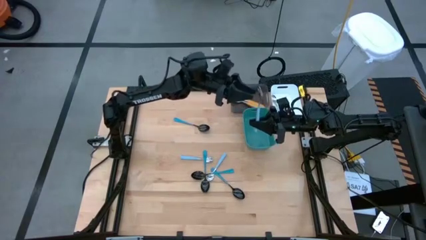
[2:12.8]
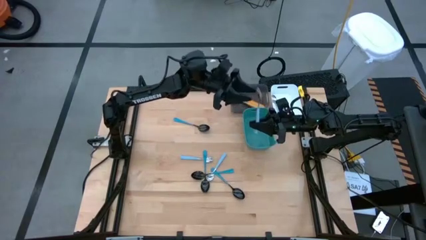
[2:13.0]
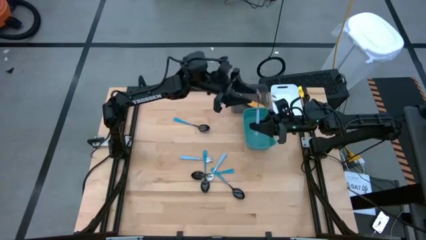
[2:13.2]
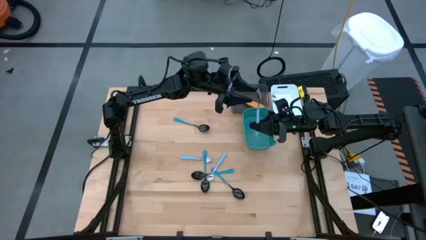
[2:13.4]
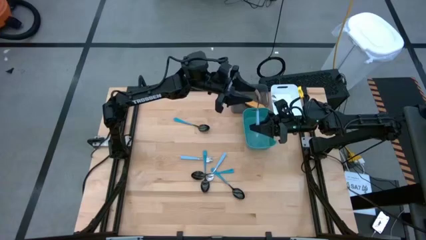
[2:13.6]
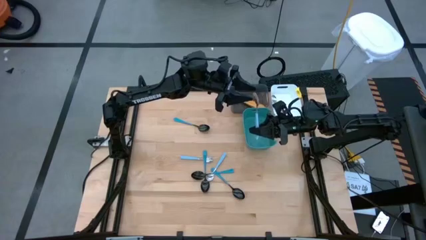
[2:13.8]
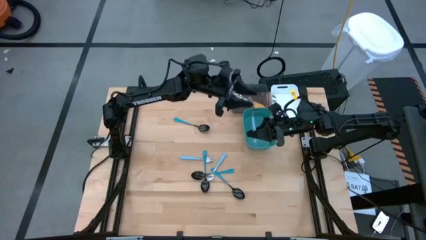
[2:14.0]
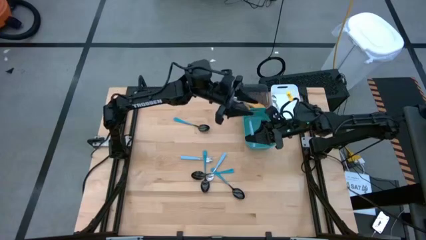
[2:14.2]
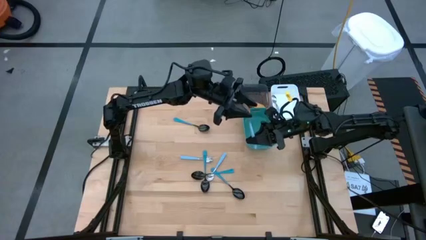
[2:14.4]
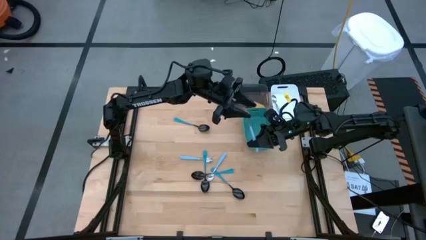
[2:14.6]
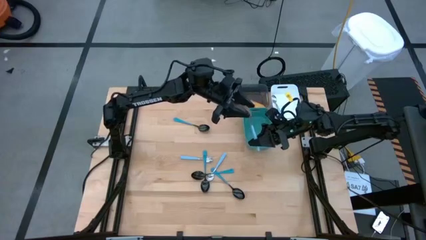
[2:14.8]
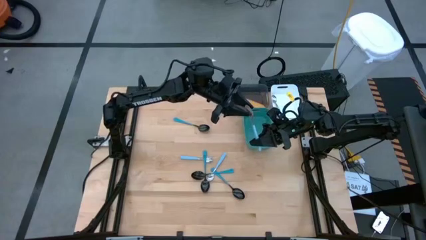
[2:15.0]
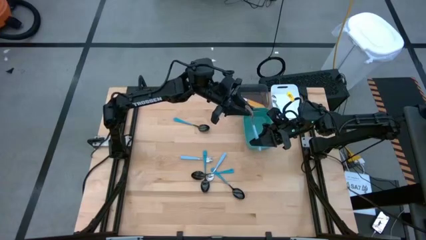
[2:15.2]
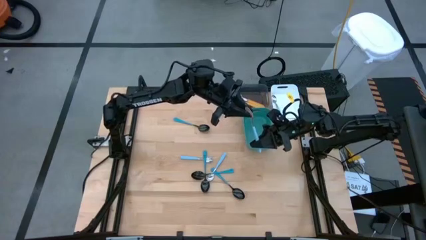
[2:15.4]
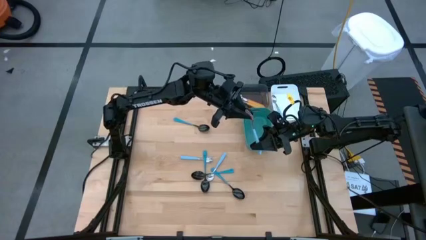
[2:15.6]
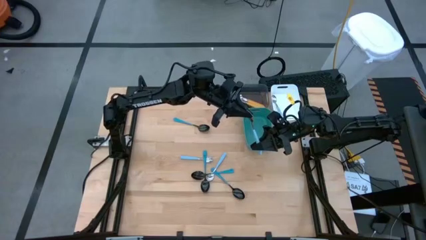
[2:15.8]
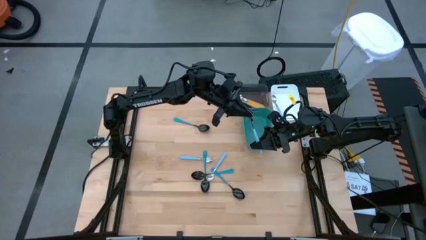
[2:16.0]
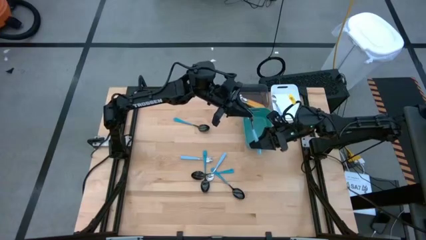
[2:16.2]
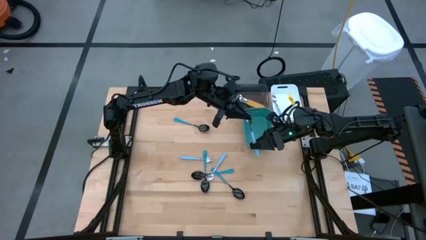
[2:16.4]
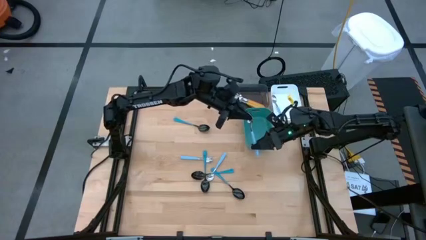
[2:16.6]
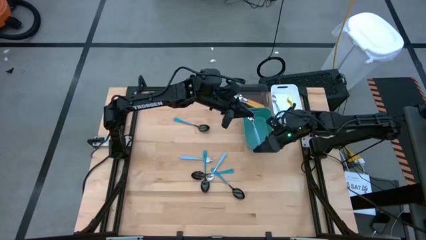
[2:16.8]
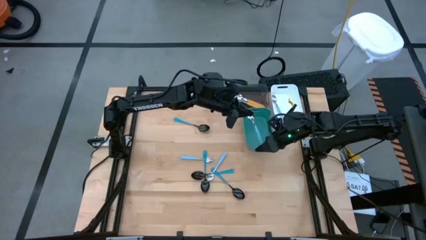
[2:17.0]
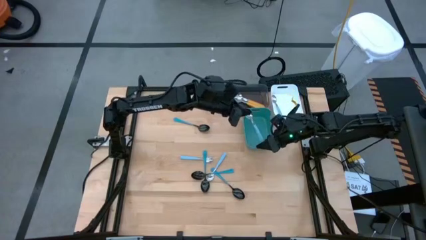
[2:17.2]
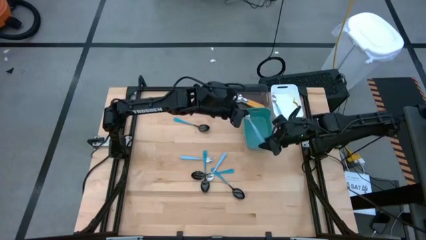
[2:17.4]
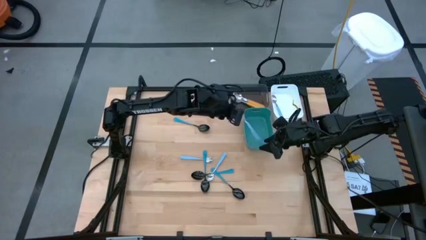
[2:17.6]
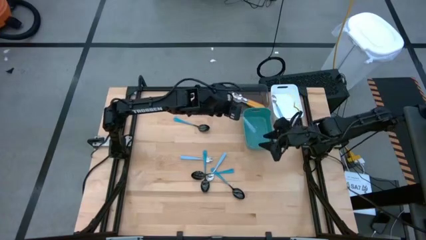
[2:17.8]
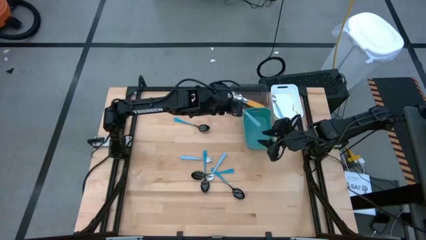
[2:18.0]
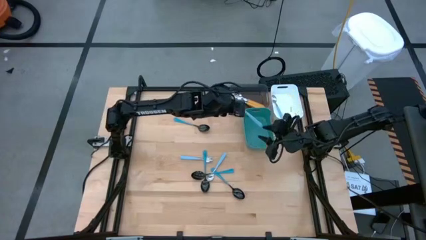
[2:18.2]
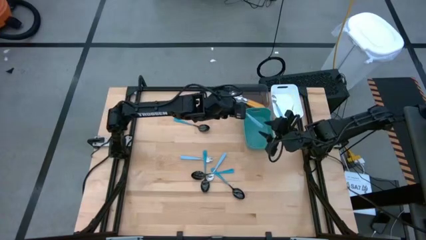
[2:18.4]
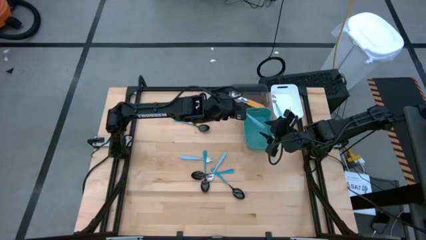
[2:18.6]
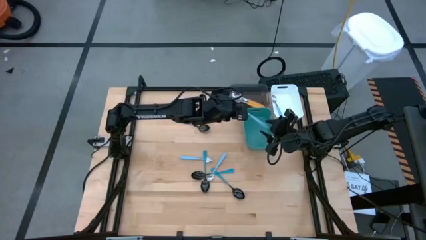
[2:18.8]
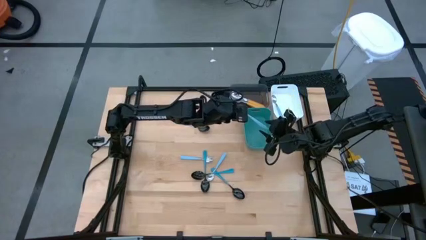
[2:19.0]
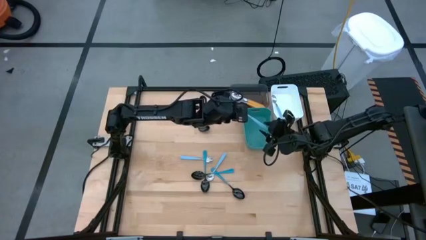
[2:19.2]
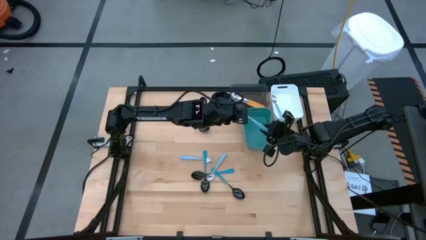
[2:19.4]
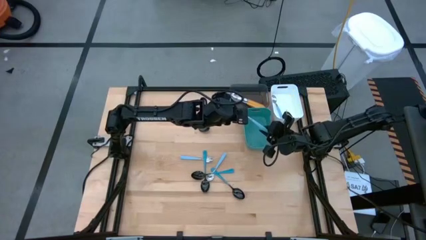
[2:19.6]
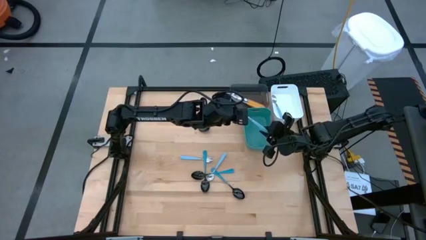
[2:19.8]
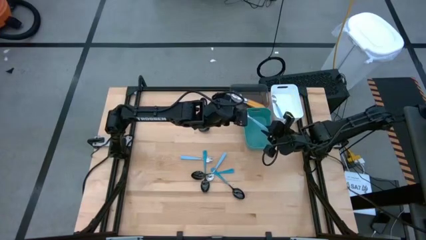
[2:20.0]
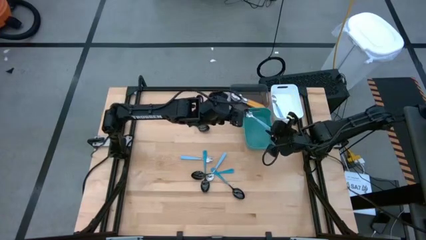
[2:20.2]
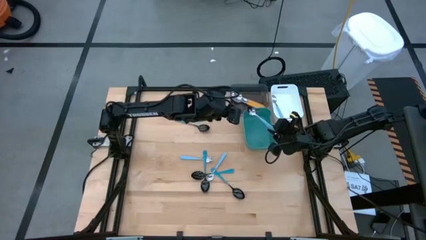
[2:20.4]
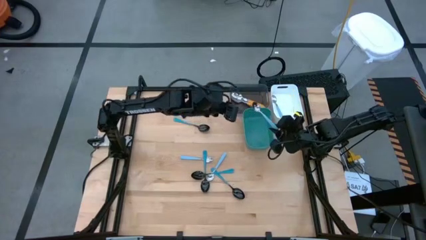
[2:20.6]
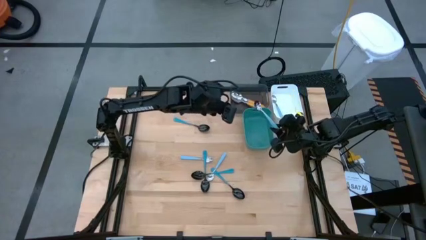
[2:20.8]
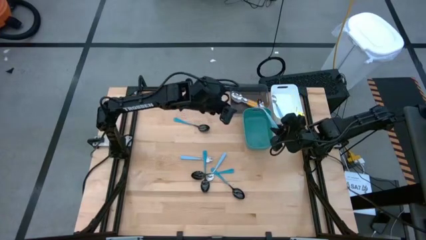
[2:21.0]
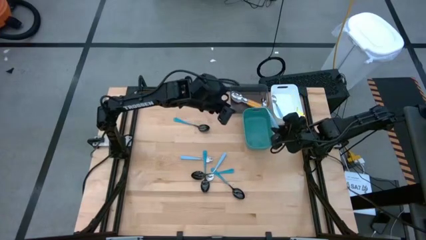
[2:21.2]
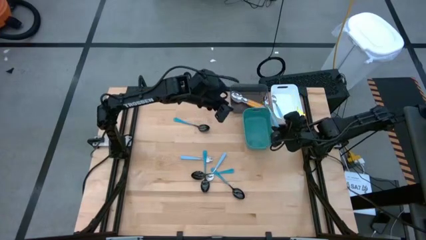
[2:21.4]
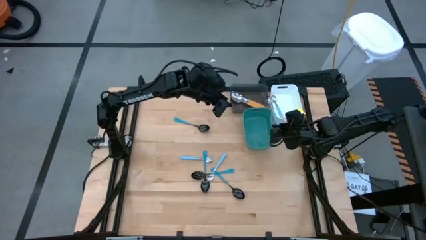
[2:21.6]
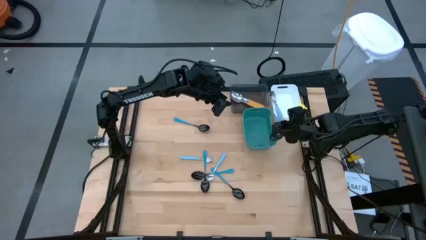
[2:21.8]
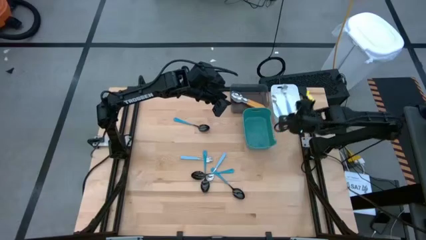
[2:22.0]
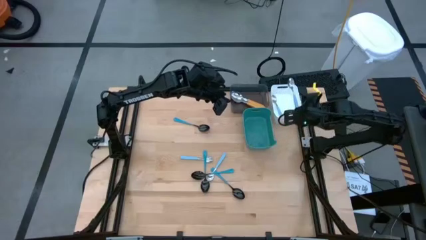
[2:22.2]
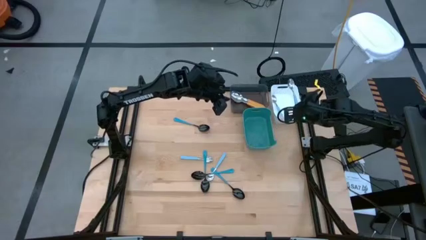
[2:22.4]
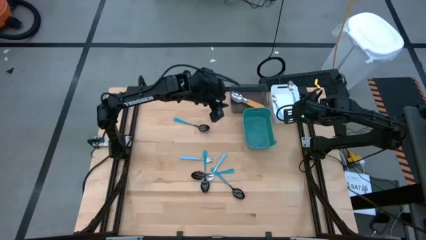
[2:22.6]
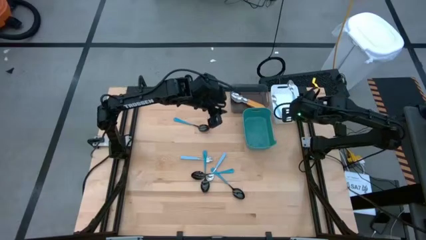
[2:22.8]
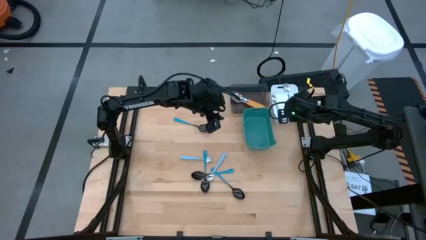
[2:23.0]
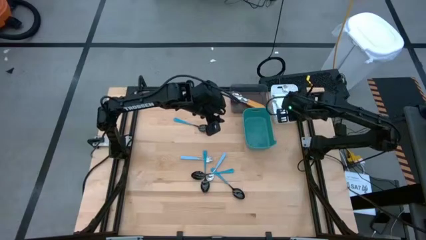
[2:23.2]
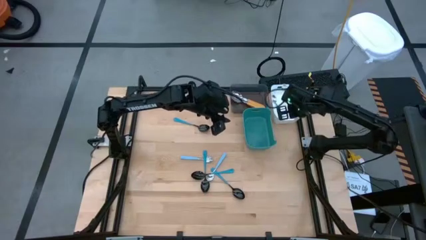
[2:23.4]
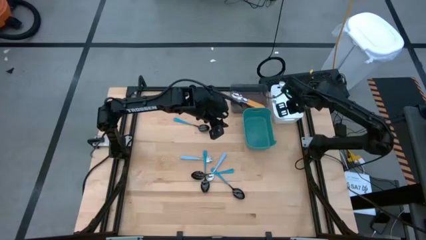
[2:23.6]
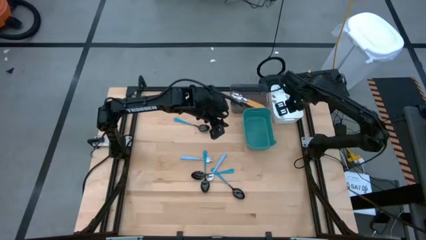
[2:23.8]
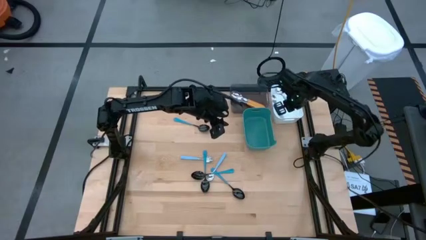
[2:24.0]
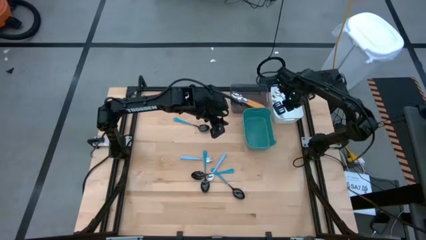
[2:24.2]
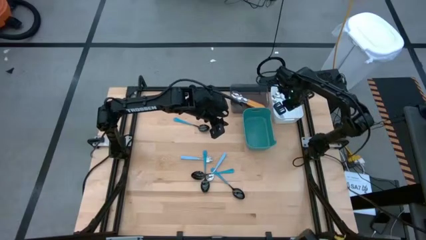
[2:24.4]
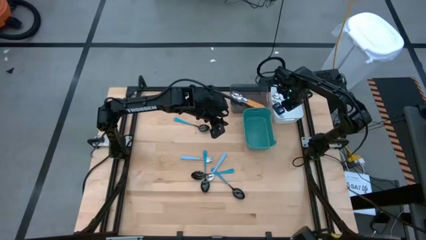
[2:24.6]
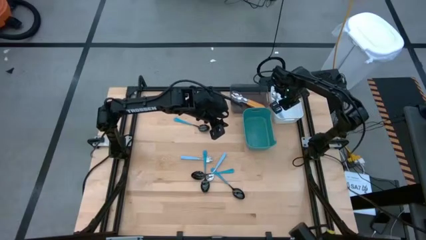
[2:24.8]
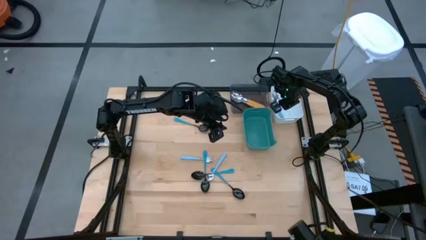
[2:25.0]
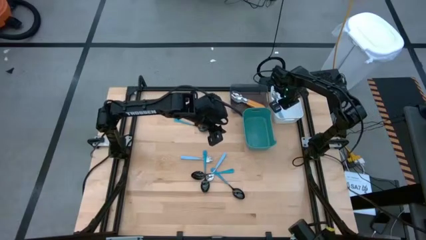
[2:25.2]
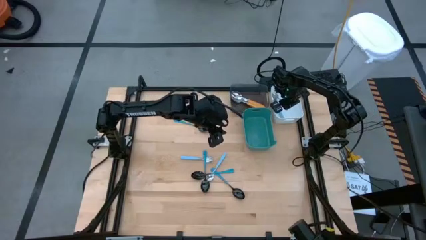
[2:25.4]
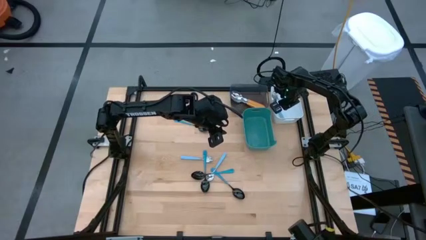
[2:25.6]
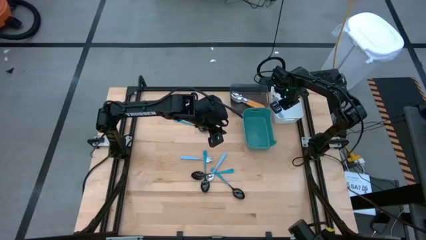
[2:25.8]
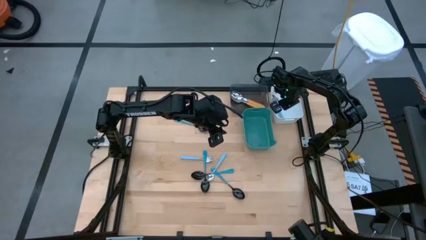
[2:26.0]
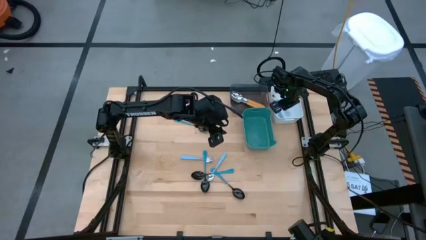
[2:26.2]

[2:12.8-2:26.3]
Task: Sort silverware by color (type)
Put the light blue spoon into the white bin

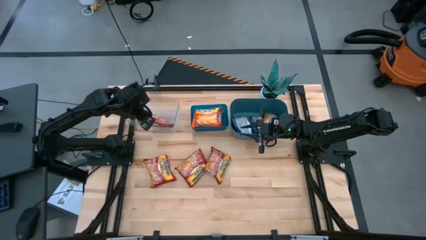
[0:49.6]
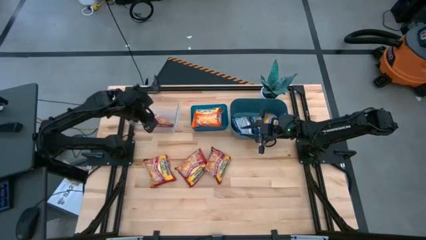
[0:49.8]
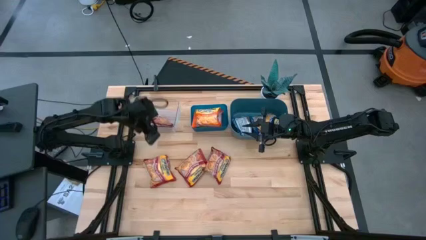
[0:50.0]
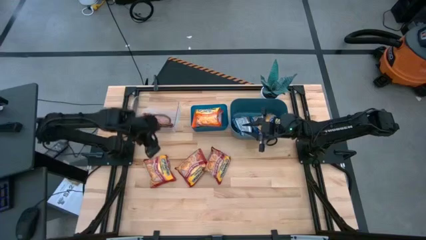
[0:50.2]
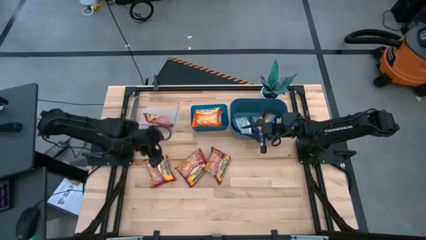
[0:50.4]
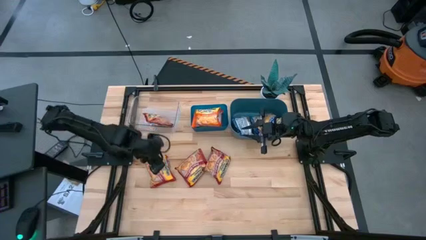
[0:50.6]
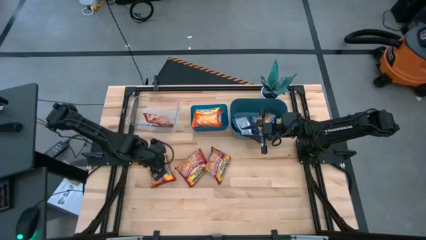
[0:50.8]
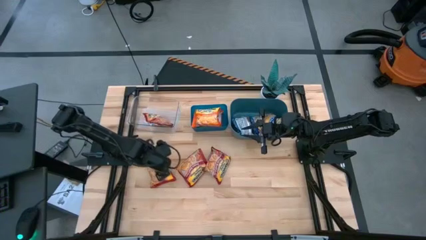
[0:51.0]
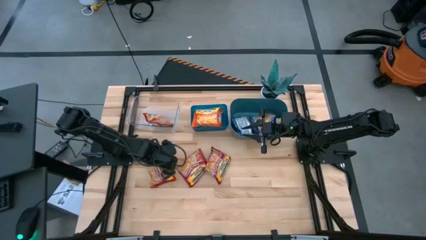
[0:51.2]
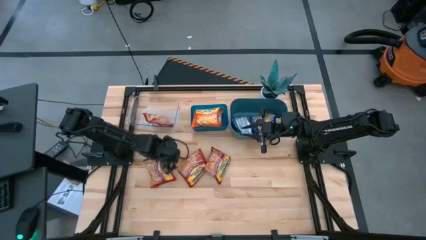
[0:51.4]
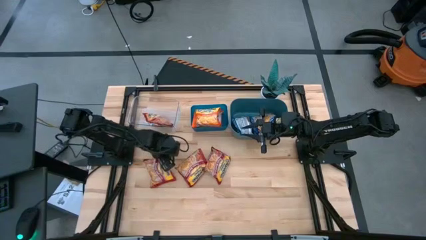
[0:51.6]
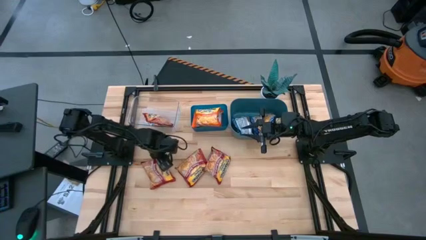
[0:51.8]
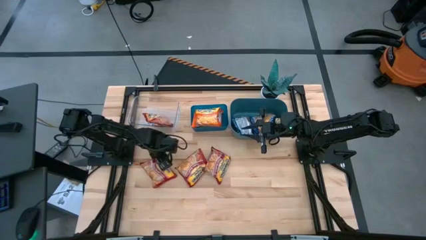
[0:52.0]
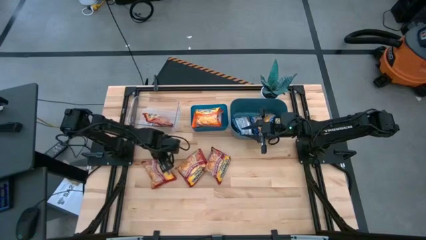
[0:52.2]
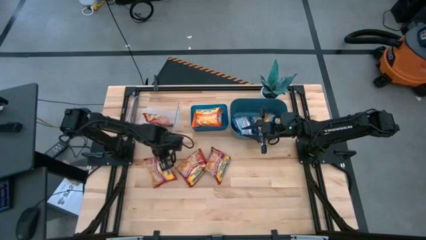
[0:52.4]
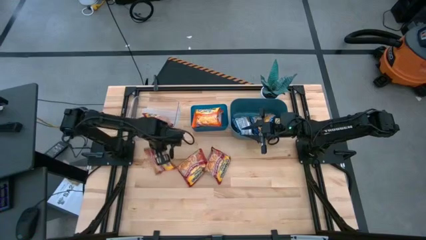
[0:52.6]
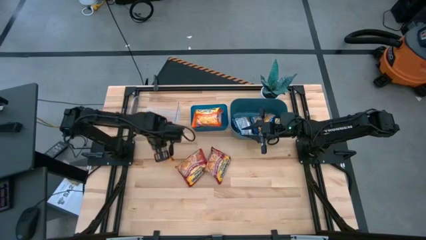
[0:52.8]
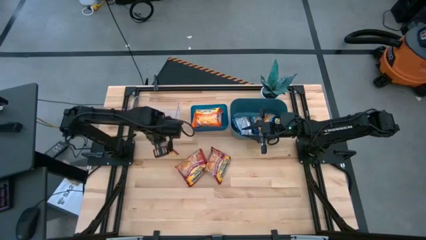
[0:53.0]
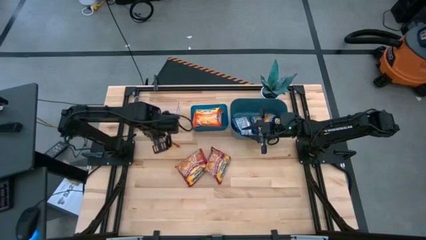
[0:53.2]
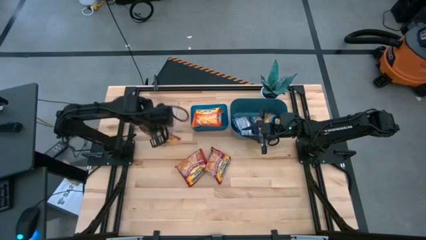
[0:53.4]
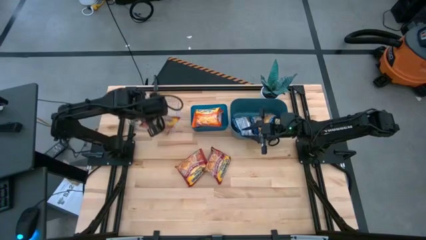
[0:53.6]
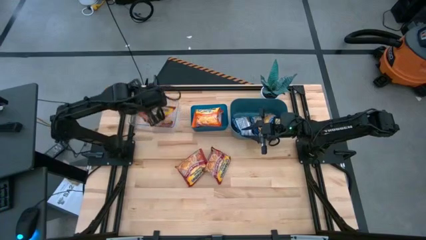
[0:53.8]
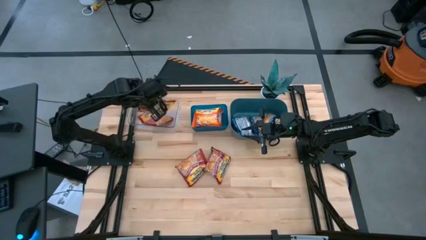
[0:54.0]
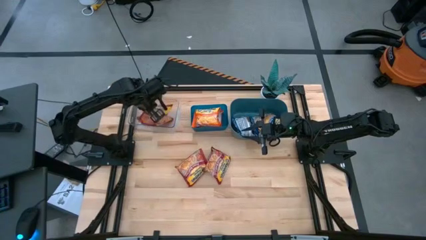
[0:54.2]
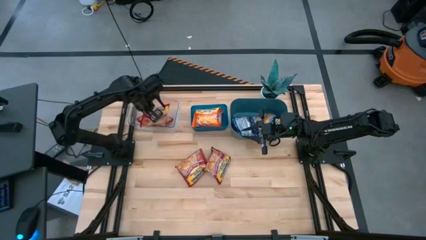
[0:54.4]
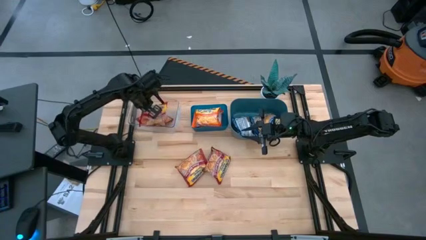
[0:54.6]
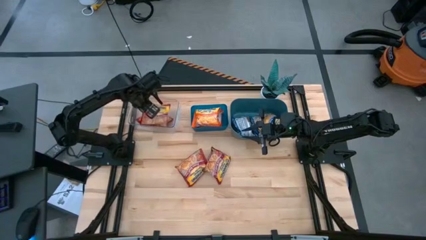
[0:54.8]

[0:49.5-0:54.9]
Task: Sort Maruchan noodles
Put the red noodle pack into the transparent bin
